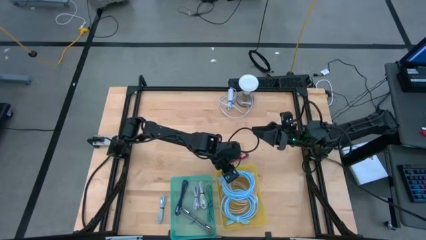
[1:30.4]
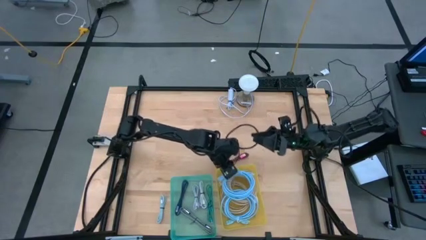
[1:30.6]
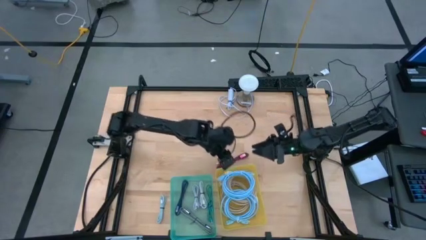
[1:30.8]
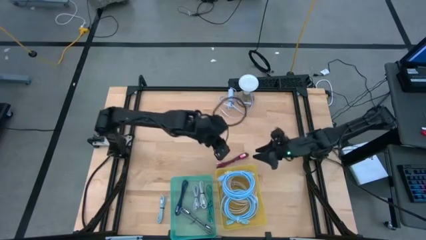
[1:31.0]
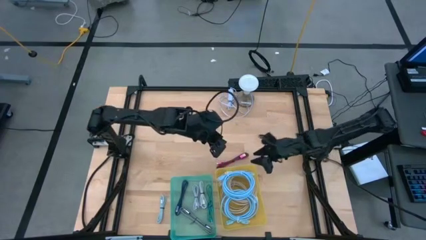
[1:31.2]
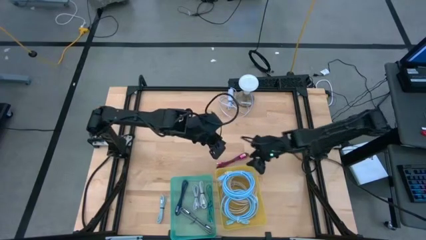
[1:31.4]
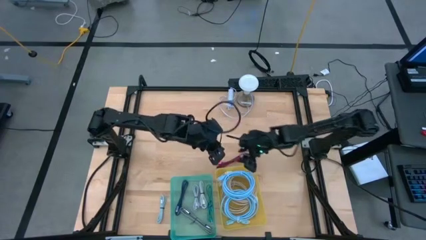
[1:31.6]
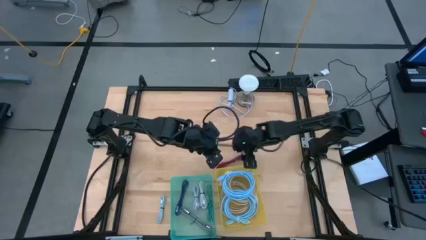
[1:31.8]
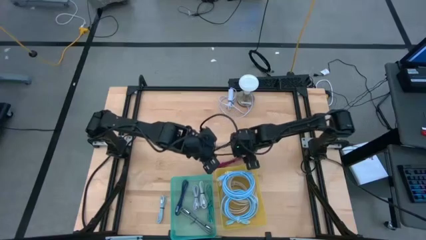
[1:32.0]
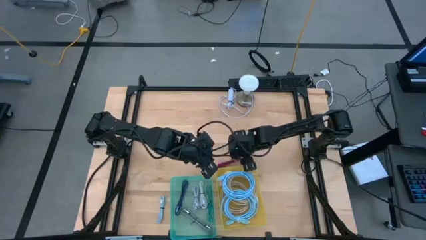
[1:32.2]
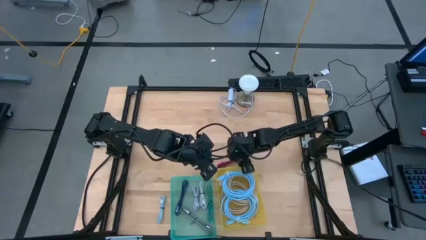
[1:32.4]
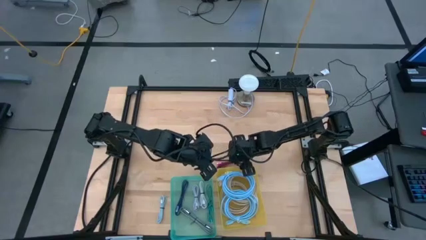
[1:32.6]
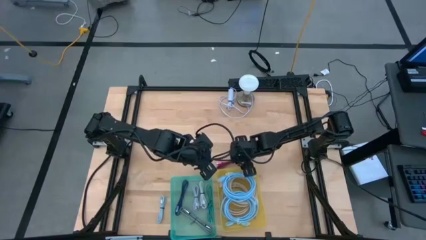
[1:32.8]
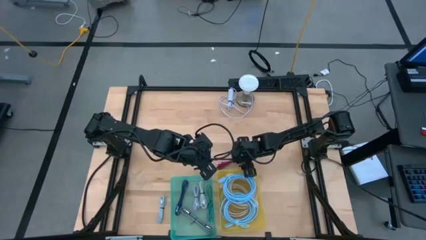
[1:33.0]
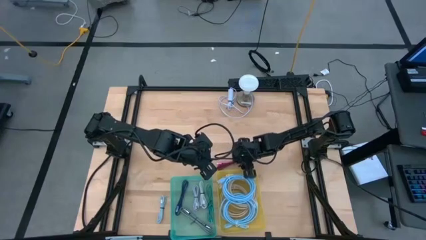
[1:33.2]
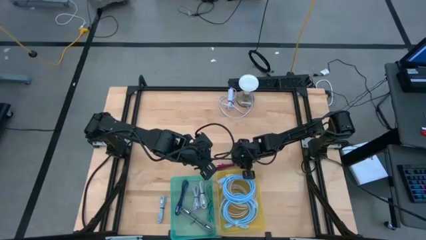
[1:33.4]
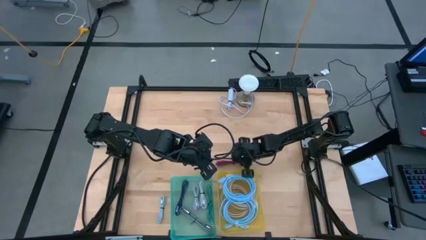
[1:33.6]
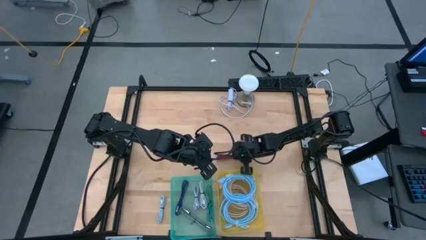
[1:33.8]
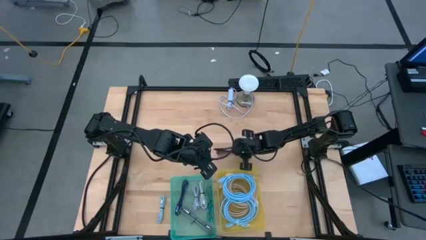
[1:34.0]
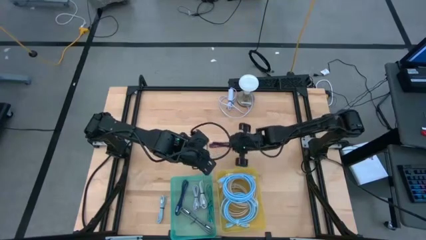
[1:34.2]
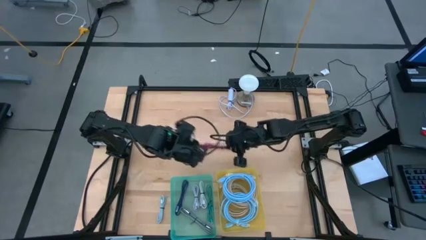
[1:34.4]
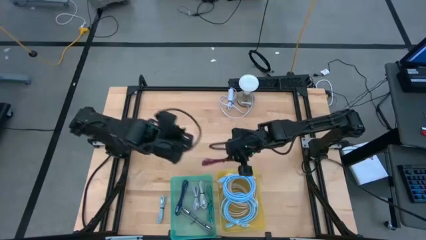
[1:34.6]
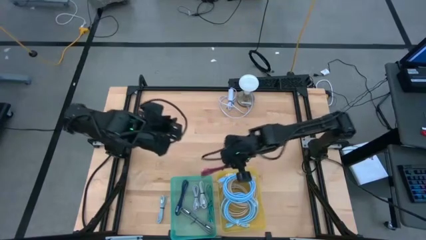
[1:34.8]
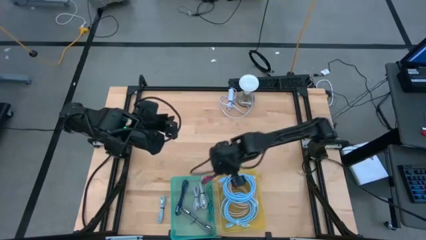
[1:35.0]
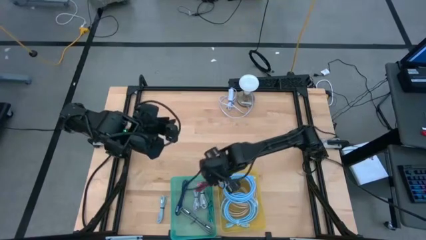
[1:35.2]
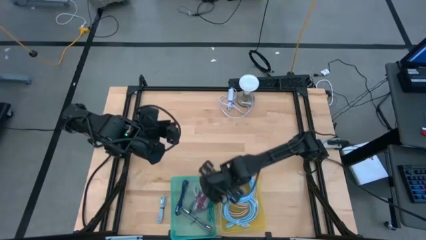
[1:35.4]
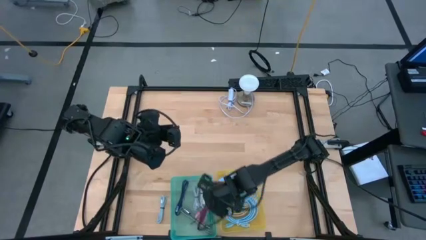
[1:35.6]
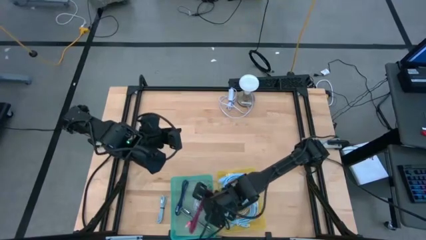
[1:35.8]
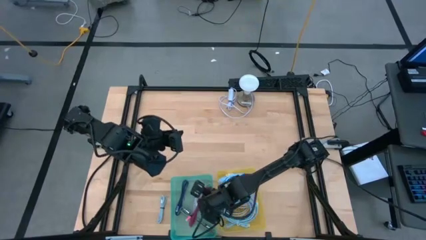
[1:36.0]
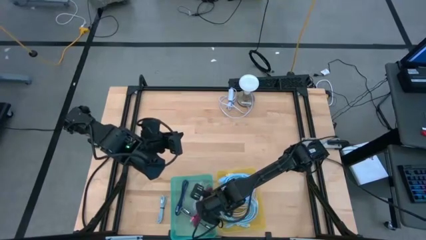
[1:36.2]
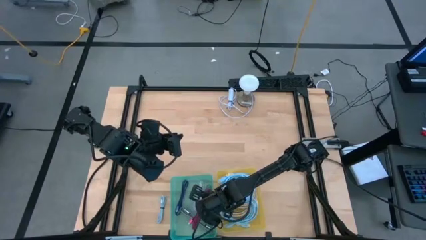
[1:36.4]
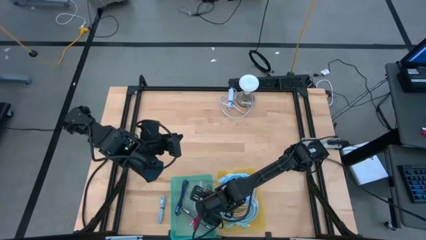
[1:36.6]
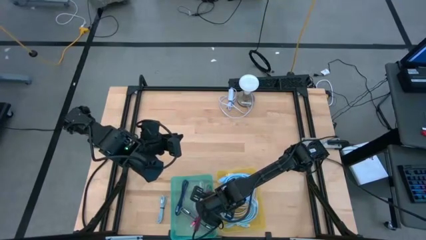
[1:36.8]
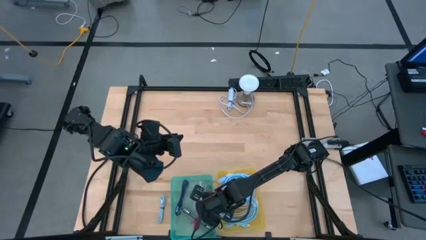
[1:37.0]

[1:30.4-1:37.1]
Task: Pick & Place USB Port
Put the pink charger cable into the green bin

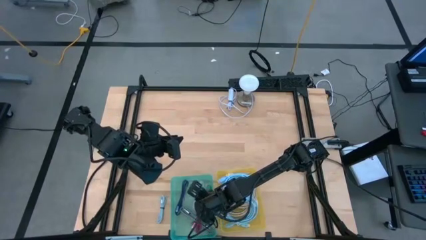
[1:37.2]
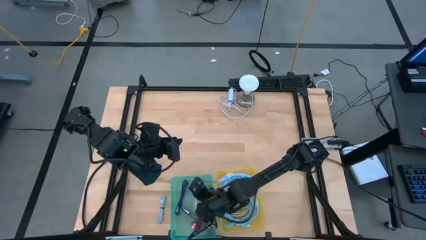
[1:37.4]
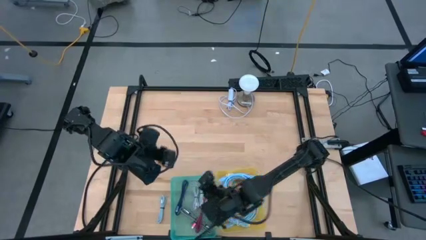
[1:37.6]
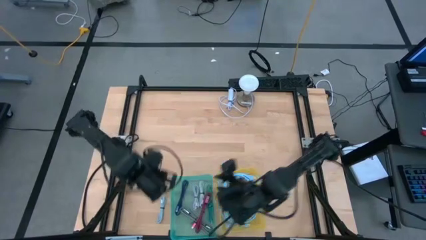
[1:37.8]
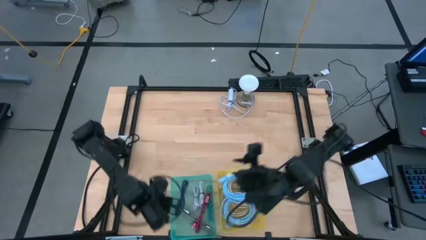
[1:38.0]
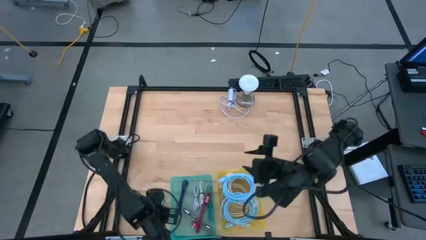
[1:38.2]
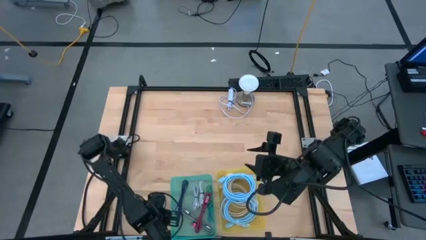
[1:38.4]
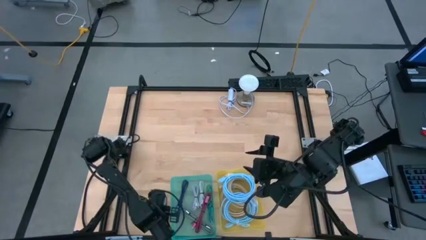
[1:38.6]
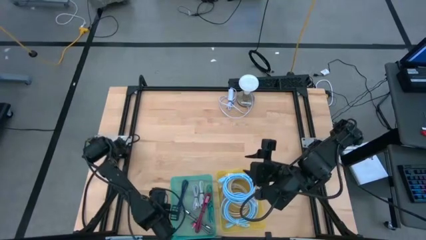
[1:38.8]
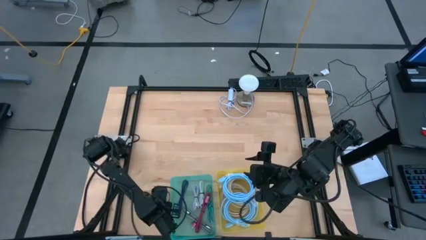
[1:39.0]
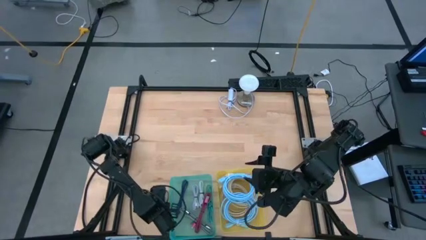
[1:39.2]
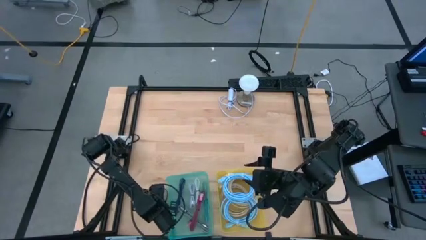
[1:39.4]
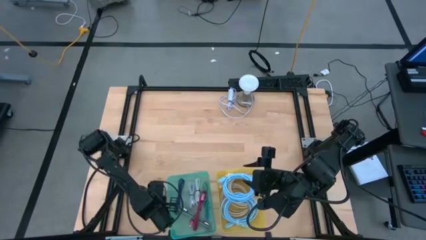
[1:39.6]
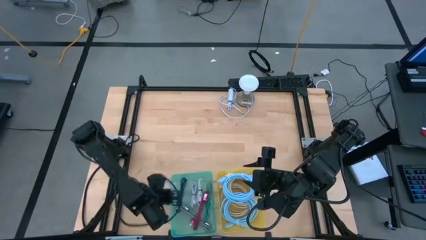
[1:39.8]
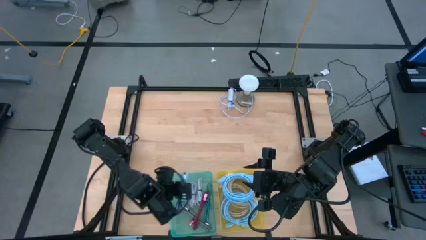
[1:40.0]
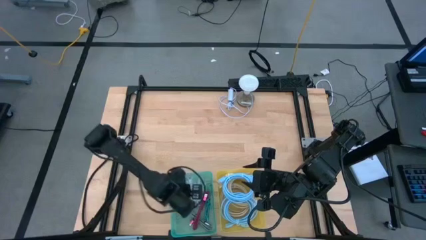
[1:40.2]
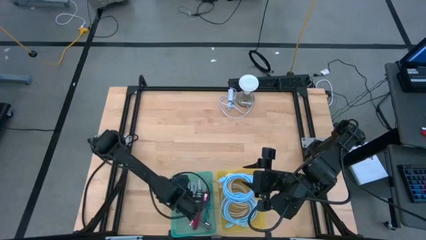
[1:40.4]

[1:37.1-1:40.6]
Put the light blue charger cable into the green bin

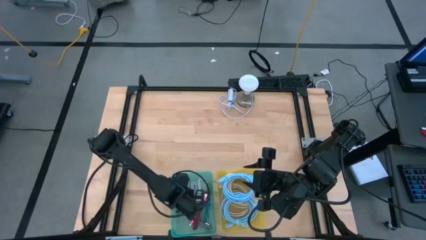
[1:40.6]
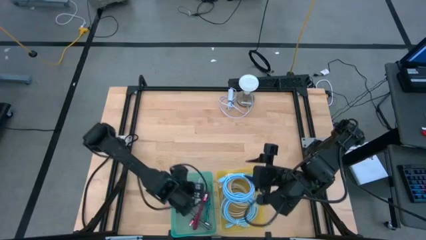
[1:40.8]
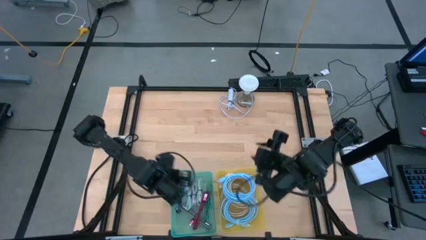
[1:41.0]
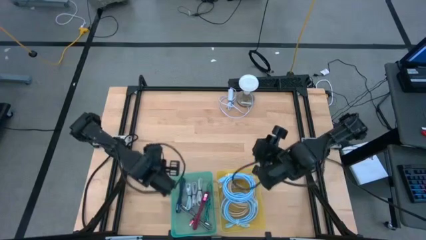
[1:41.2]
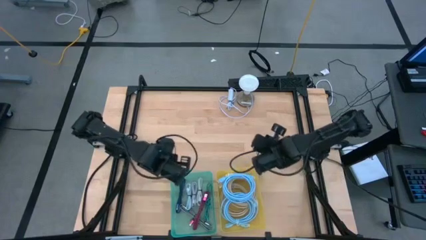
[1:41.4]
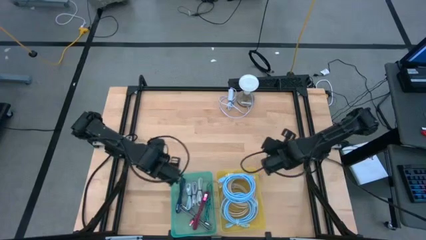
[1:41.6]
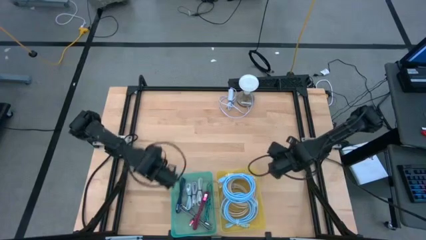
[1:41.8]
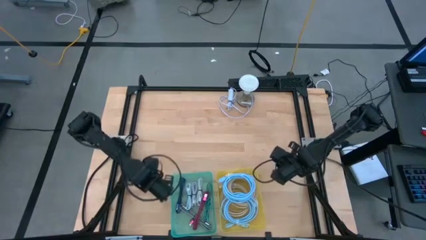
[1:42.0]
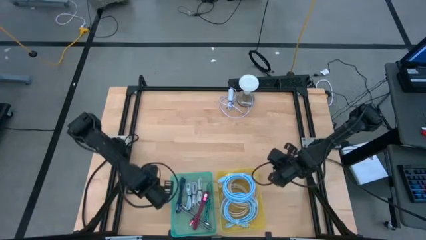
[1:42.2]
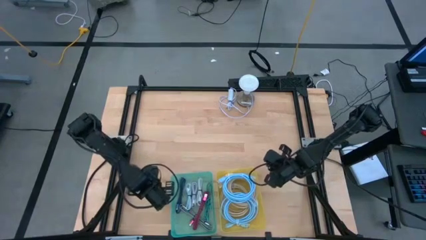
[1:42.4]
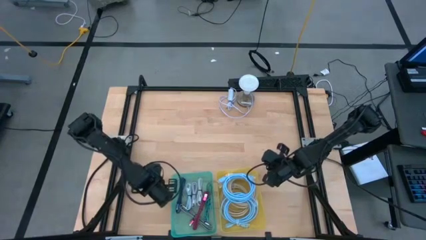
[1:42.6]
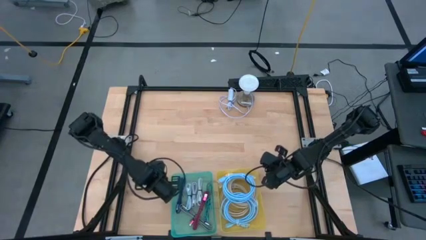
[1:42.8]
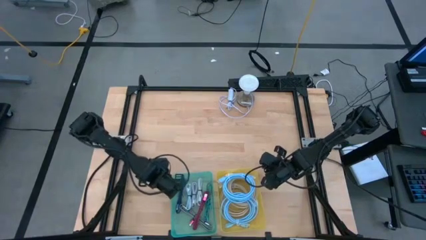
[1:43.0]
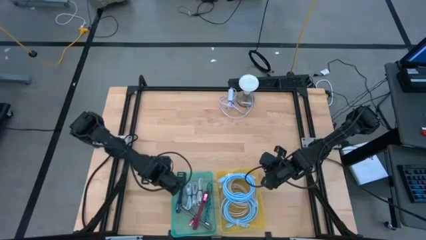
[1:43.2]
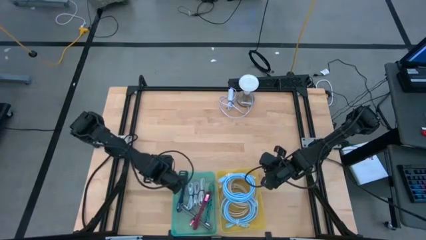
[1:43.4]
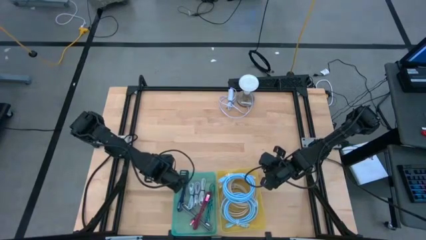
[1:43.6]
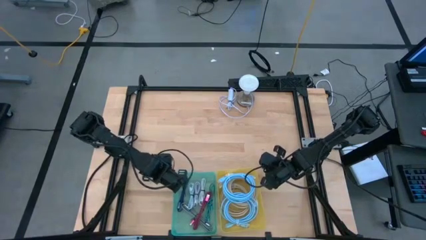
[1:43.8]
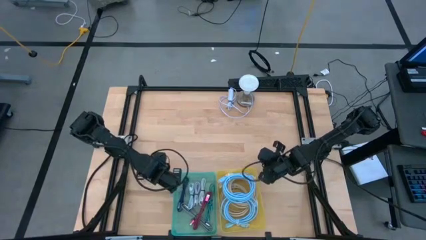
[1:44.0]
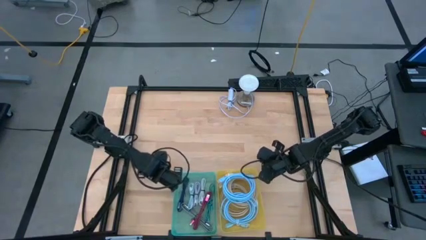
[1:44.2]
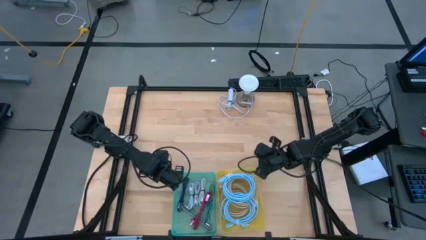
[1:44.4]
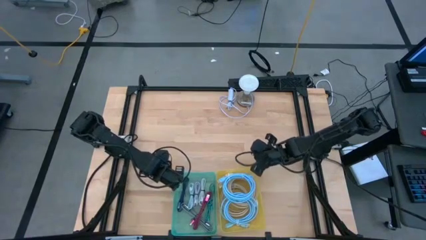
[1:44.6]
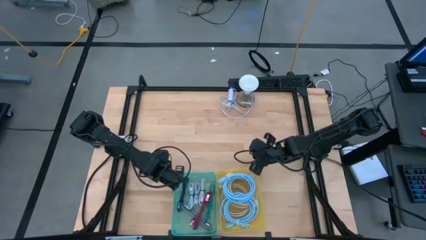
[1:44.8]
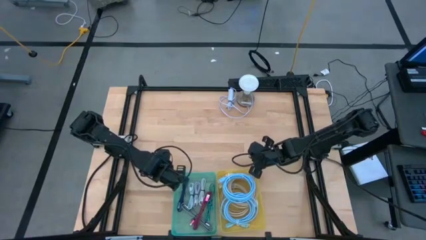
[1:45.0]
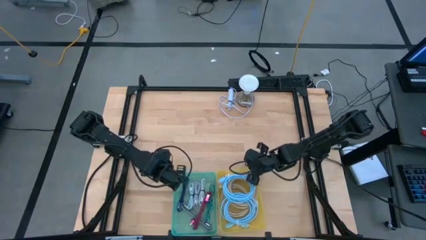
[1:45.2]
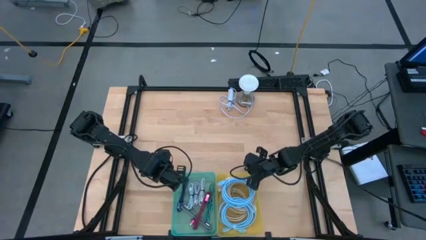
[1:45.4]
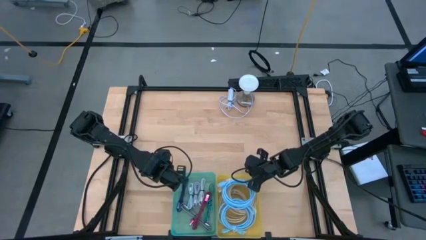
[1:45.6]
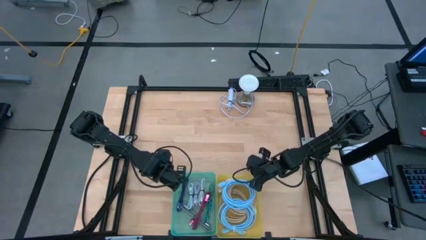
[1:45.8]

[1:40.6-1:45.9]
Adjust the bins
